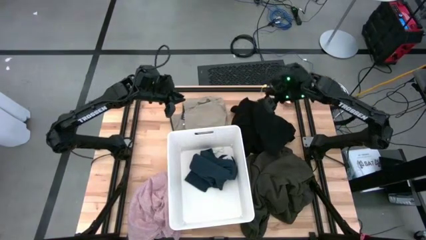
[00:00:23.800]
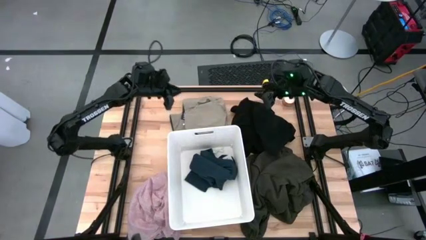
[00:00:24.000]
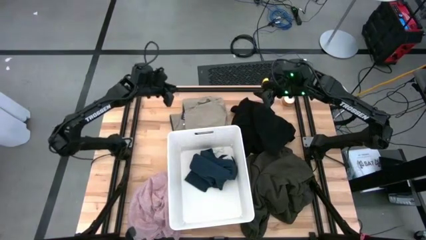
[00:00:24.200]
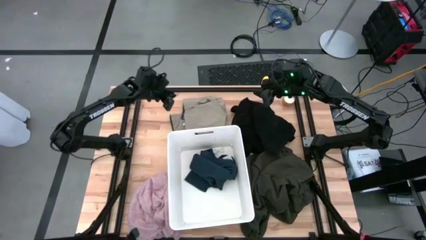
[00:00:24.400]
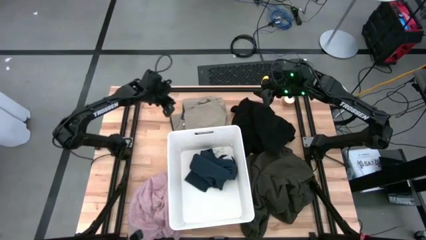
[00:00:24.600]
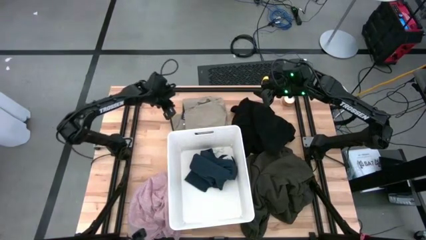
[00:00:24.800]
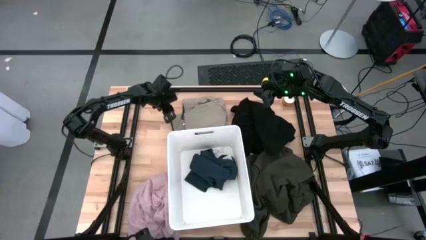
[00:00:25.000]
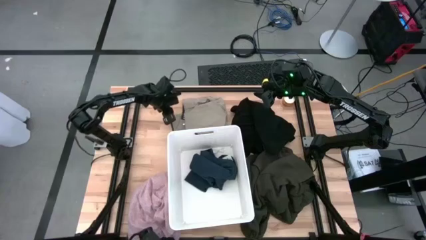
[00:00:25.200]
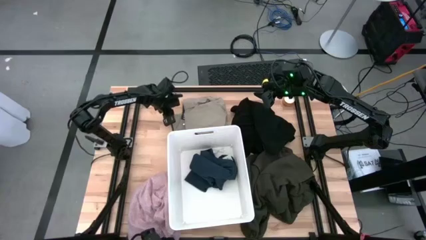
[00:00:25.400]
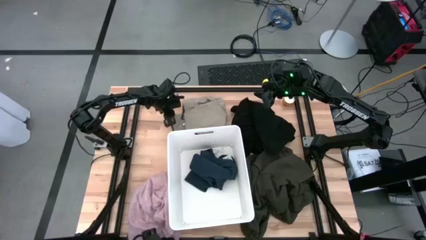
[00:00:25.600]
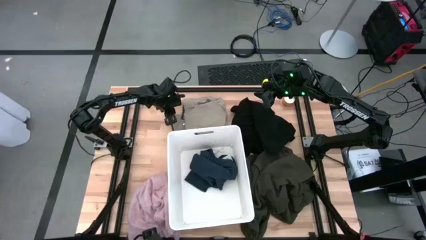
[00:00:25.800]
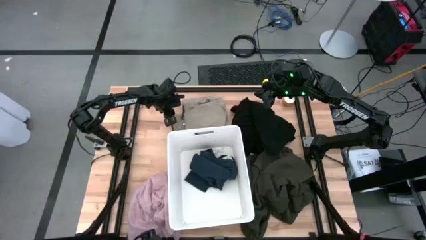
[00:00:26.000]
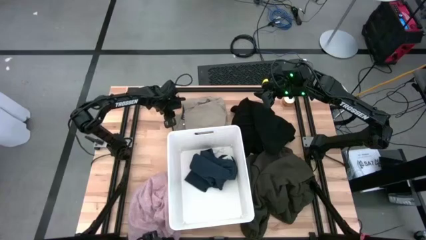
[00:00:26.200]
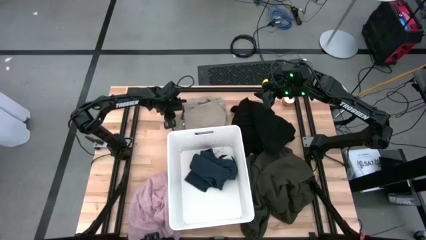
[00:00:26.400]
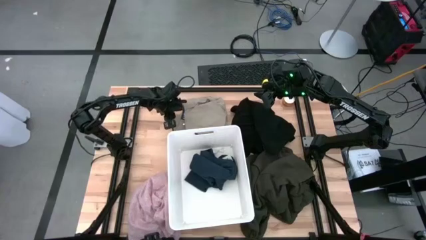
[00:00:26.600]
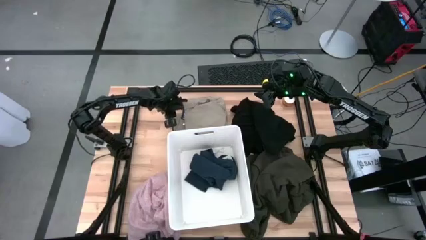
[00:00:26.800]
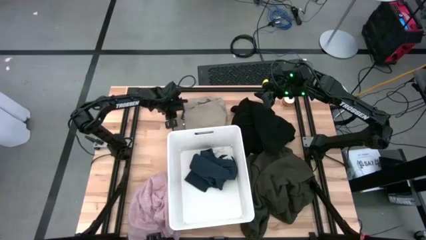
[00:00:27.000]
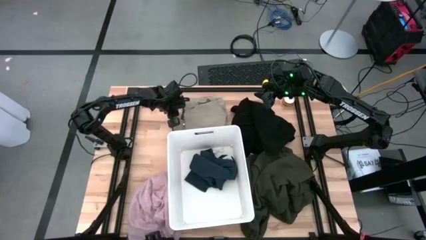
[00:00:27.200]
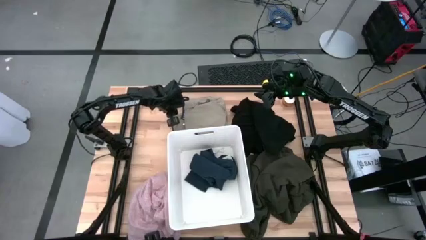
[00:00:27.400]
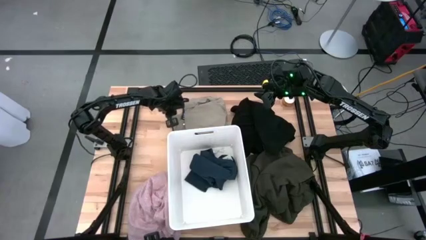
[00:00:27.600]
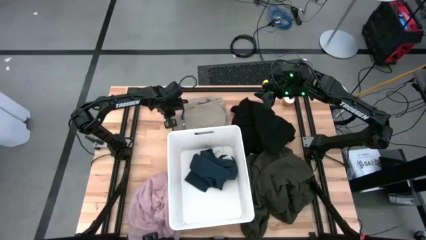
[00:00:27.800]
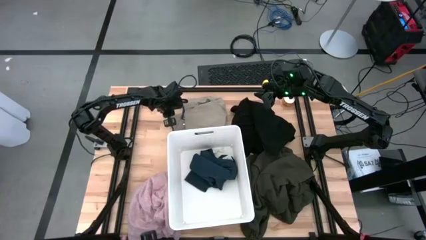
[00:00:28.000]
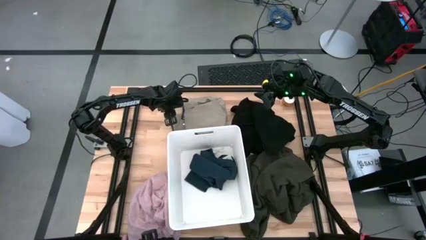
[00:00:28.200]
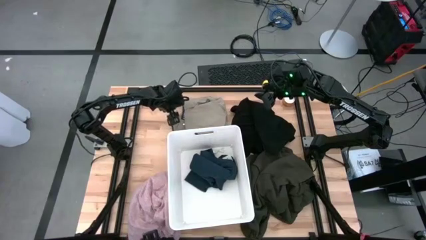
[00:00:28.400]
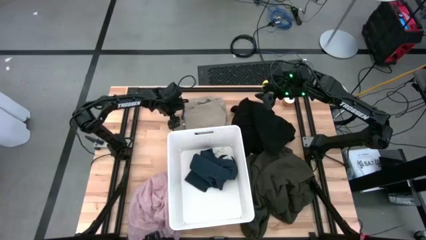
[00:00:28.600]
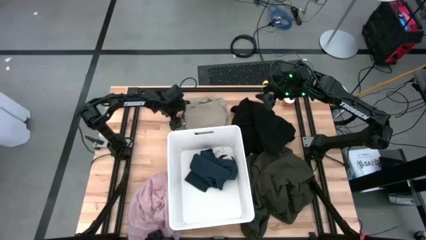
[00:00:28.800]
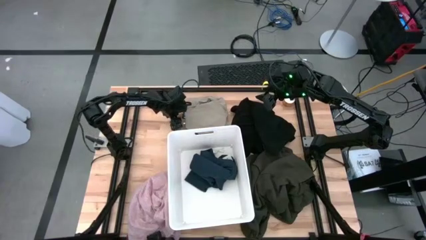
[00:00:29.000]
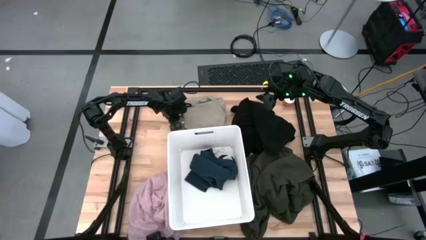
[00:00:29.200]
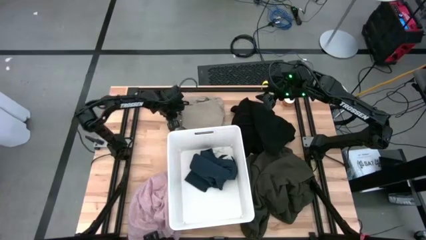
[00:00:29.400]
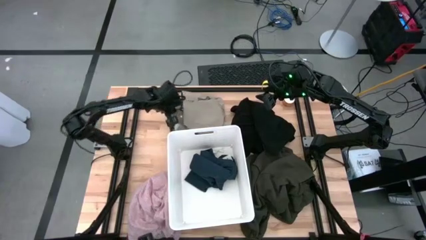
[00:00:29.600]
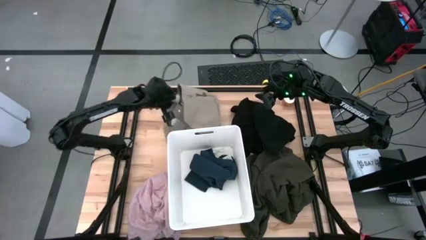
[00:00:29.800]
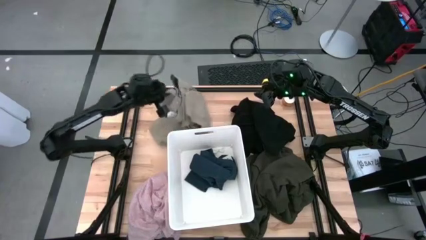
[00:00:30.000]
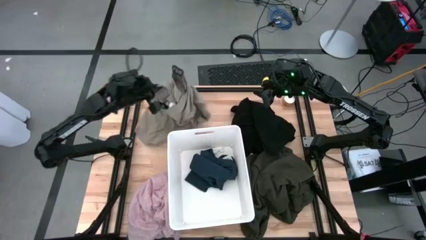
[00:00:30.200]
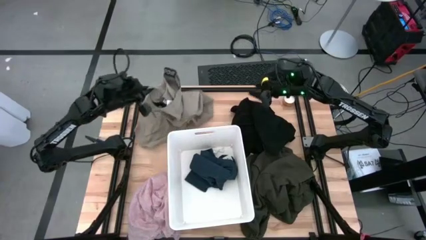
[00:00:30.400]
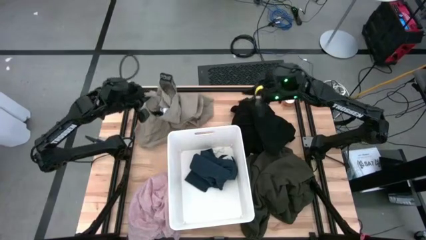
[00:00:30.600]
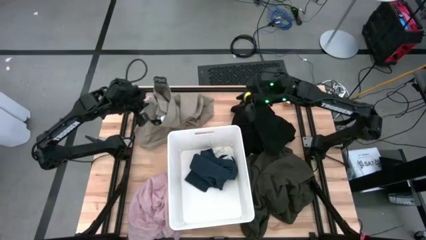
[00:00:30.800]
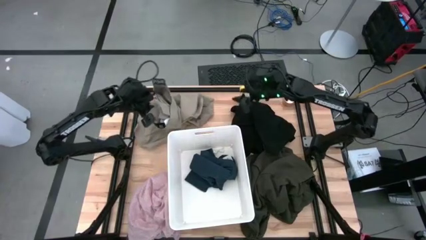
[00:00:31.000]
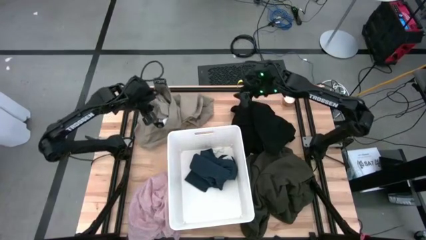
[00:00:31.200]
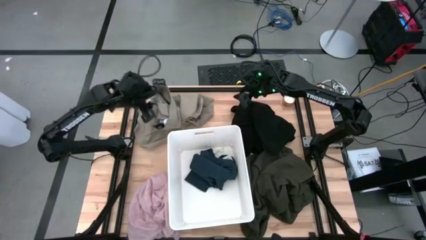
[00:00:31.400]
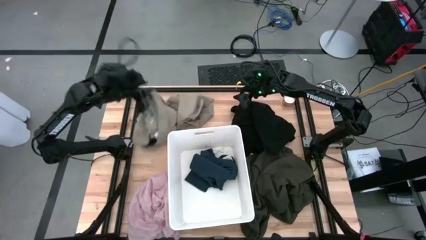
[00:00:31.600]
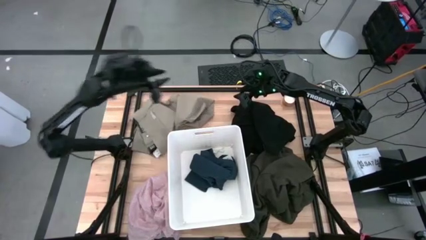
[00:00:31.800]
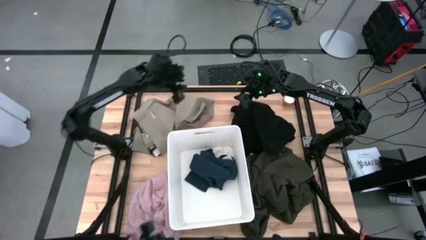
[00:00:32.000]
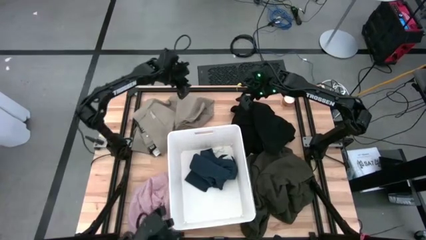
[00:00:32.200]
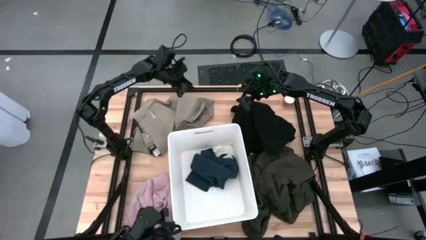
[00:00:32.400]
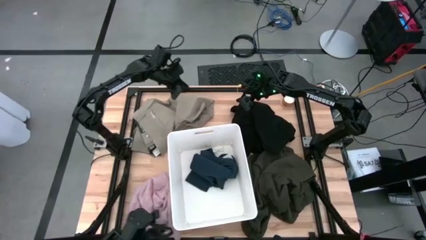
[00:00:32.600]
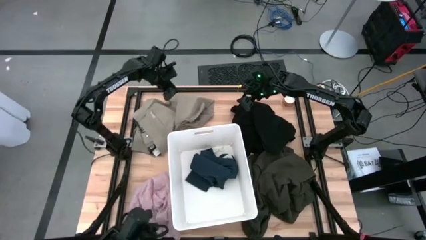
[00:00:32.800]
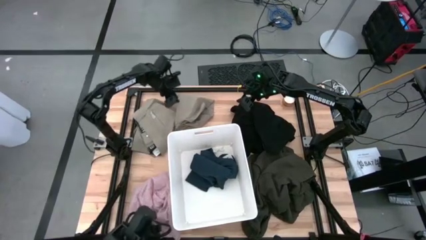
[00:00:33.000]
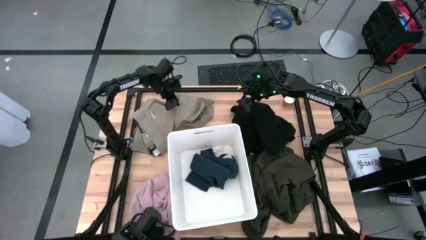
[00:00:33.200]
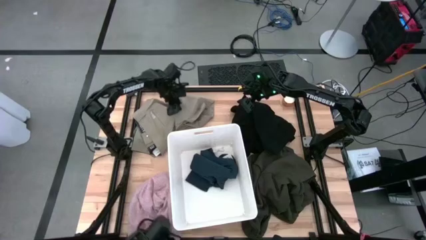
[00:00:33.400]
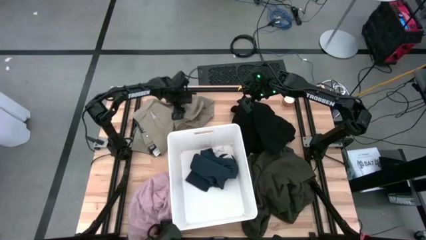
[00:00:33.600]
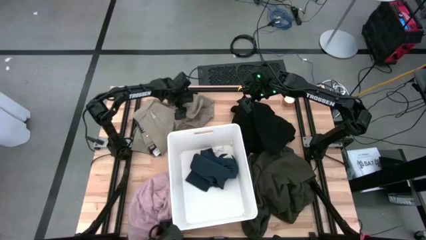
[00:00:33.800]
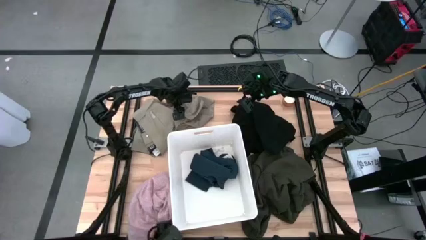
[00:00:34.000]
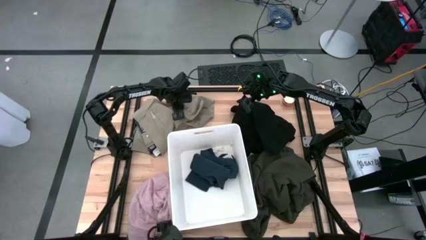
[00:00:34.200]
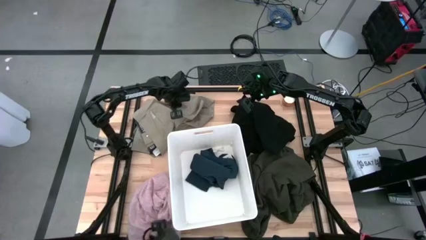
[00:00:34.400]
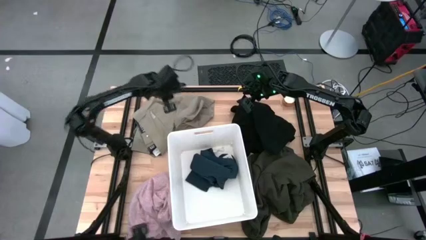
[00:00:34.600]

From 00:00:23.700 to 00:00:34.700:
Task: Sort clothes
Put the brown shorts into the white laundry bin

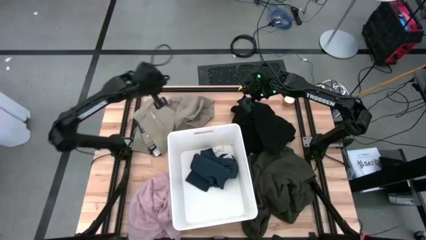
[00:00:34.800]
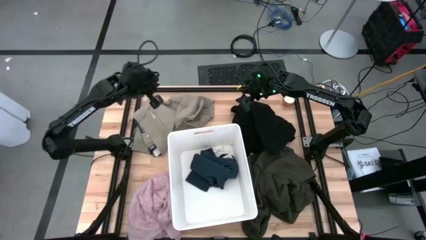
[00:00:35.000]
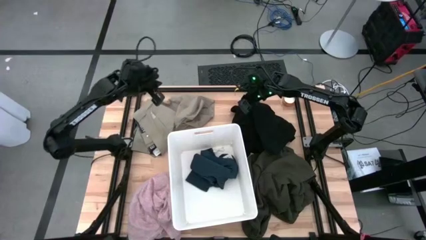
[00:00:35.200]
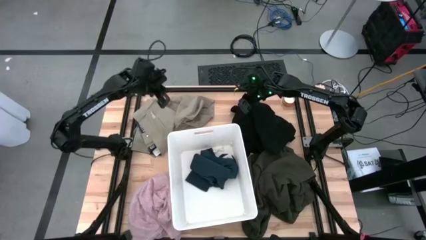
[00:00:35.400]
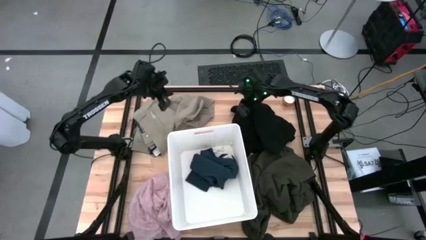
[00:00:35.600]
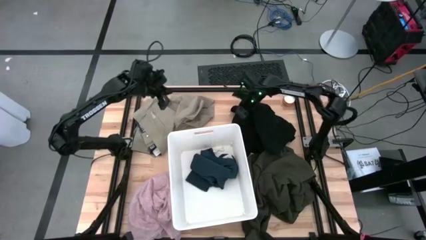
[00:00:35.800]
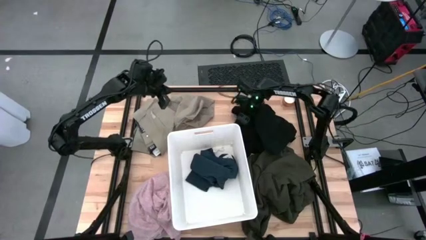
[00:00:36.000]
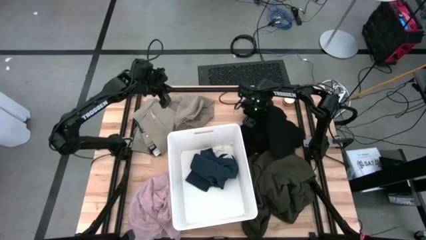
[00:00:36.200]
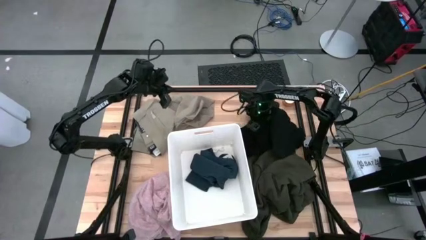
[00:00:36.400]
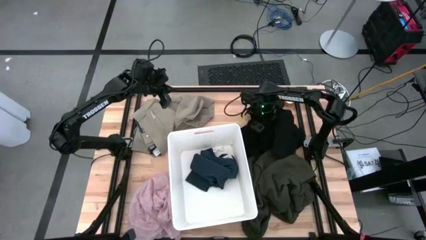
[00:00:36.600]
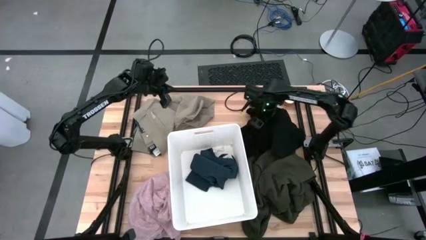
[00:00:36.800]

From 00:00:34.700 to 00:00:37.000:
Adjust the black shirt on the table

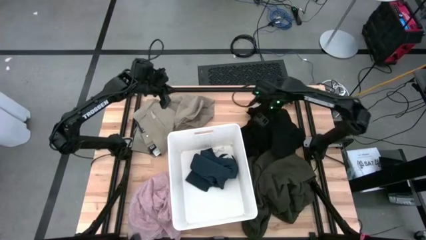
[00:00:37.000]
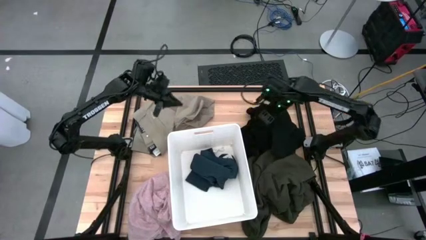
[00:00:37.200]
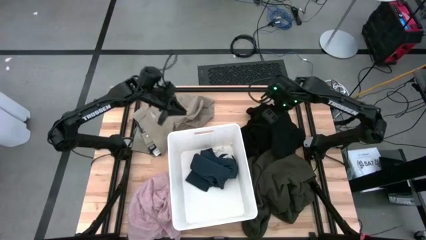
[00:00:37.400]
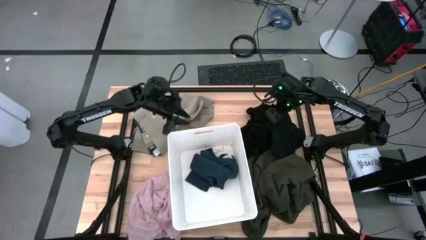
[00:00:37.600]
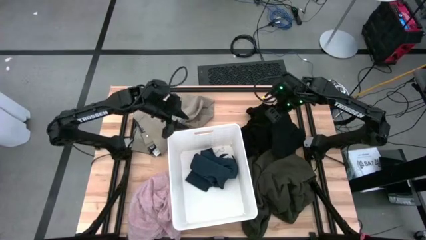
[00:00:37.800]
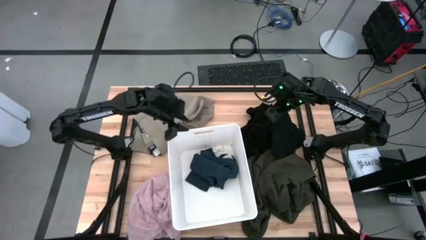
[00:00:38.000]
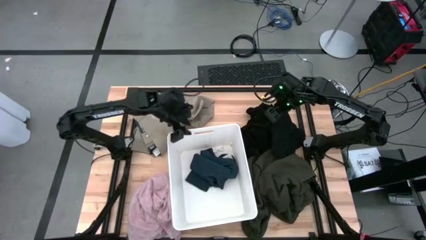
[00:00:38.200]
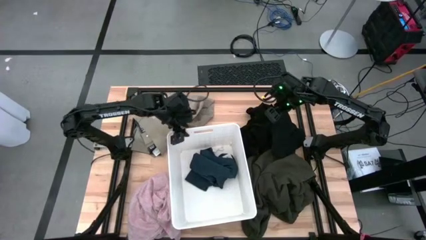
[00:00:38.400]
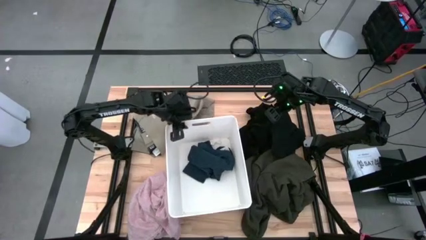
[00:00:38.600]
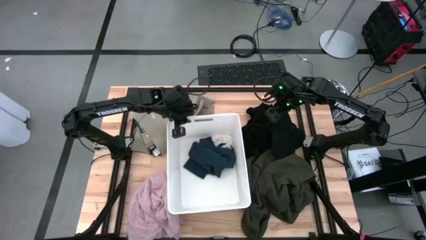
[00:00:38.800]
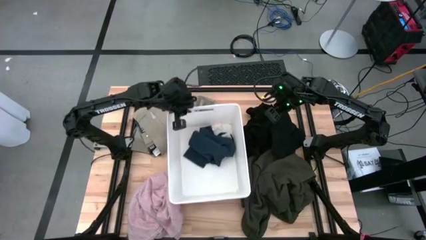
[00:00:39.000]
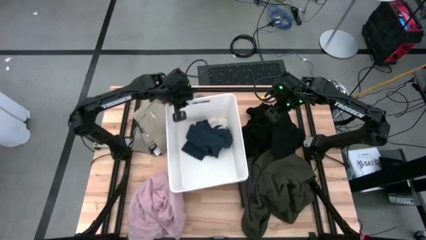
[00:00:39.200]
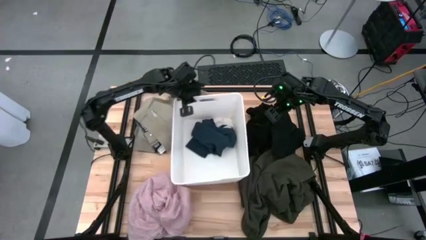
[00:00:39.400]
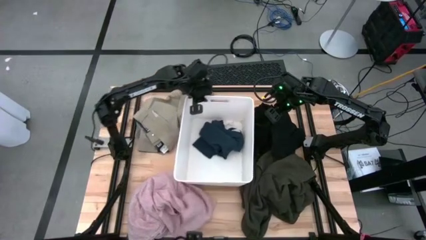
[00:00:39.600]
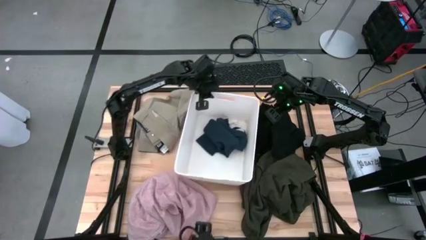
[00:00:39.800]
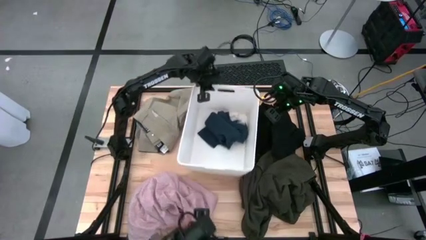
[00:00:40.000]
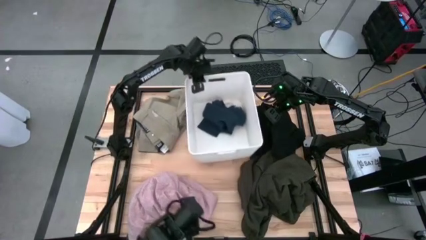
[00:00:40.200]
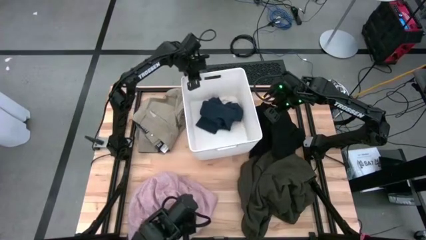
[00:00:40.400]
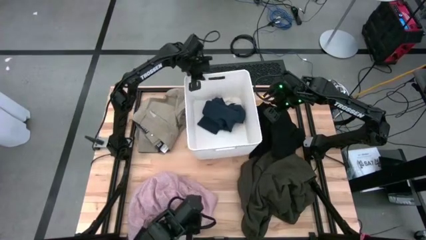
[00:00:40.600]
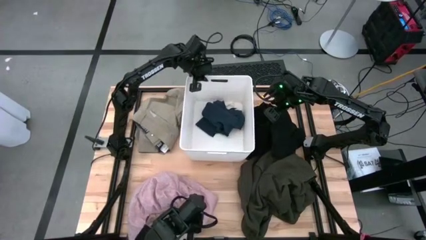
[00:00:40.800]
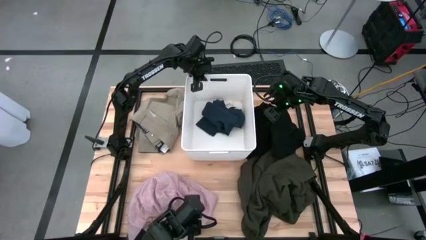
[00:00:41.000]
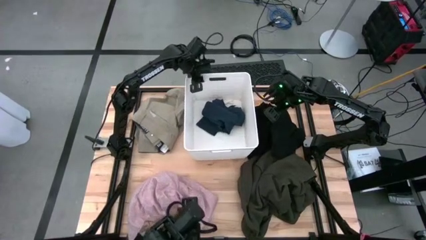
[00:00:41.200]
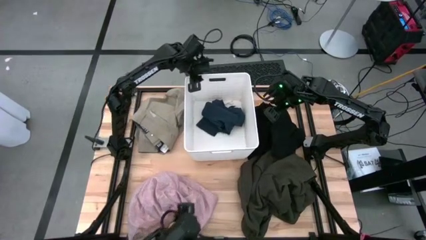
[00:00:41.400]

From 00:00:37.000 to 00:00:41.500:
Move the white laundry bin to the top center of the table
